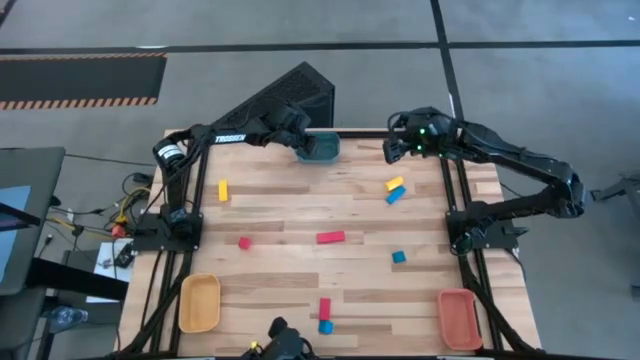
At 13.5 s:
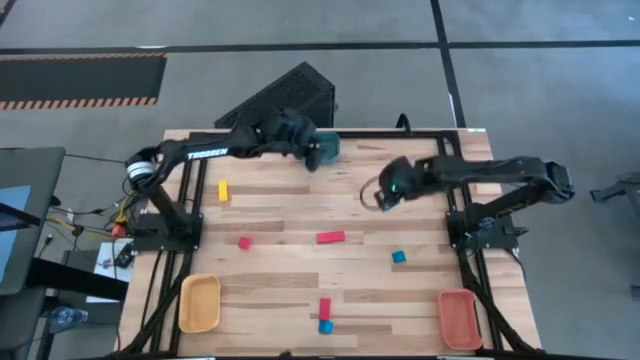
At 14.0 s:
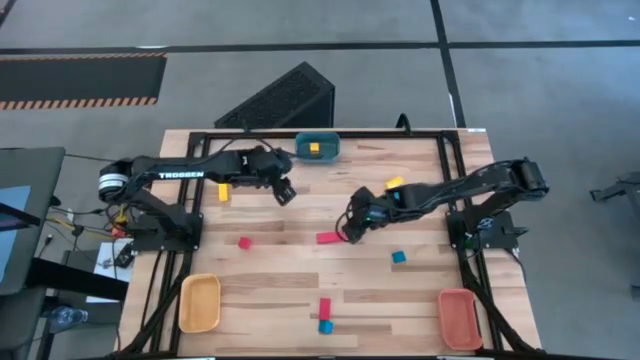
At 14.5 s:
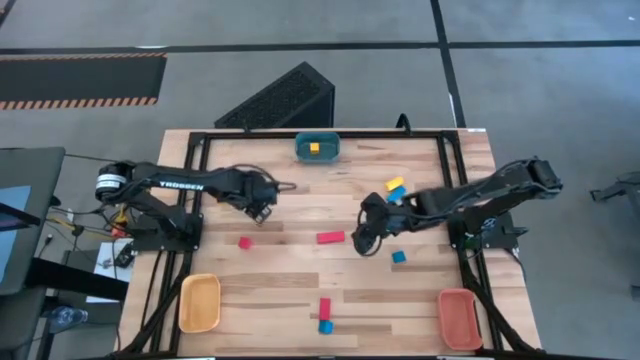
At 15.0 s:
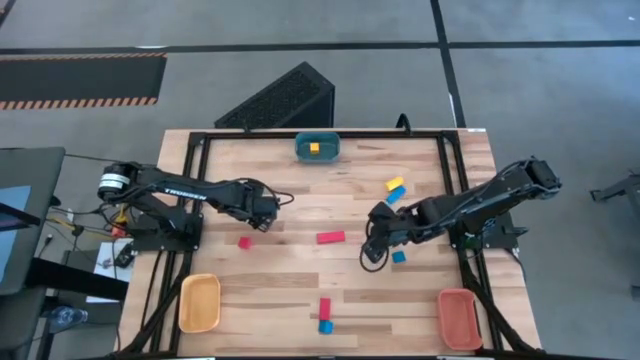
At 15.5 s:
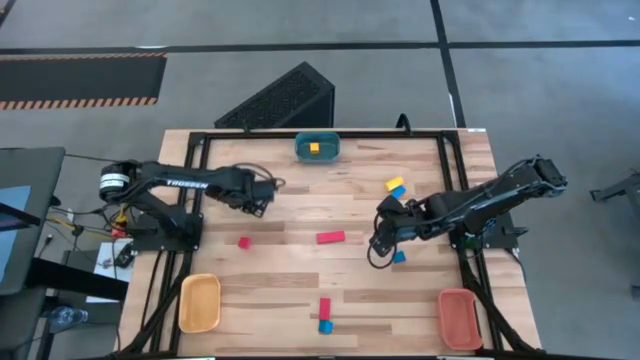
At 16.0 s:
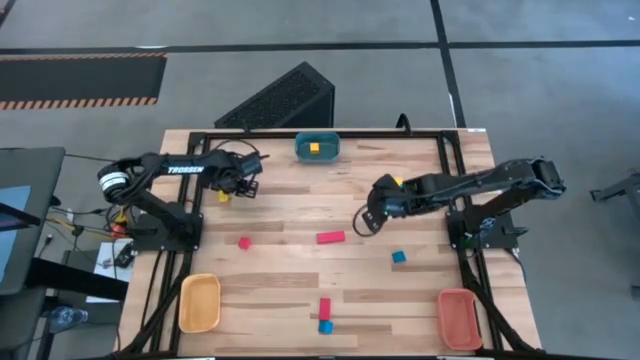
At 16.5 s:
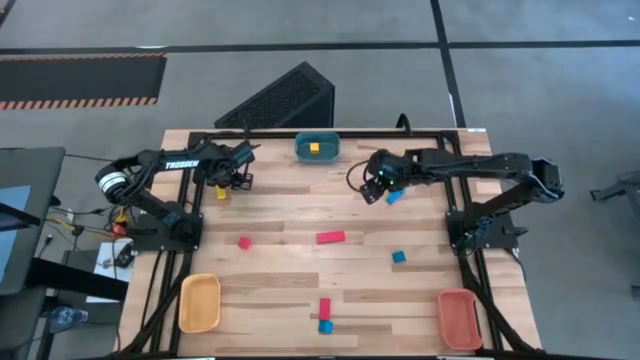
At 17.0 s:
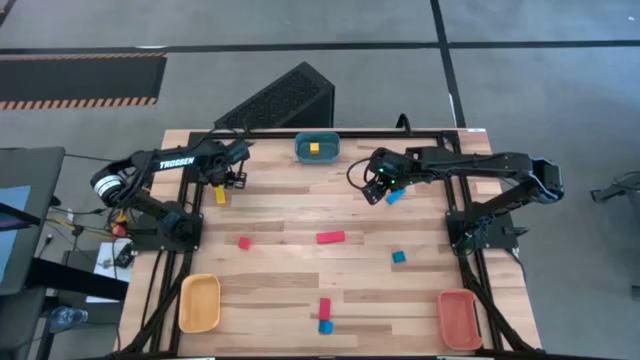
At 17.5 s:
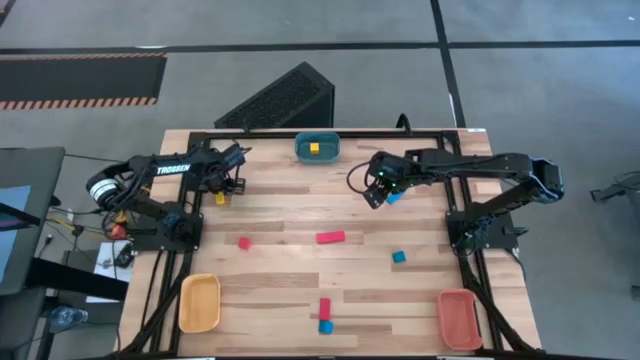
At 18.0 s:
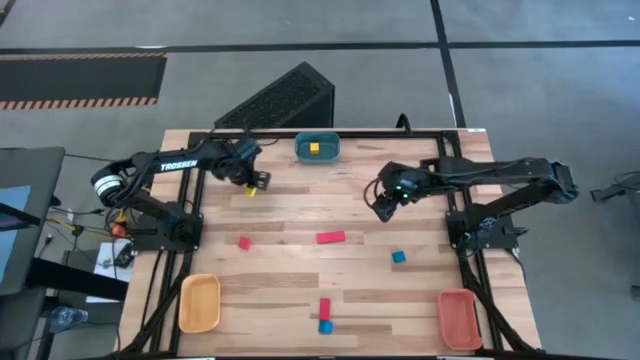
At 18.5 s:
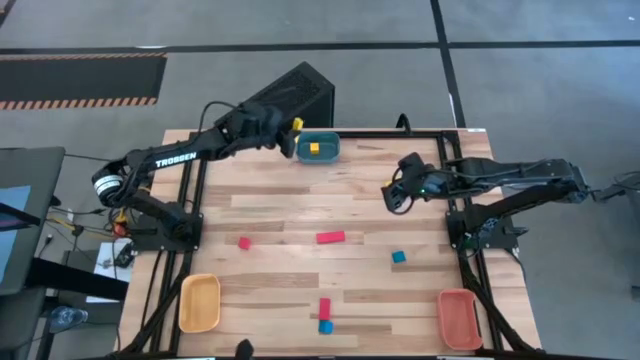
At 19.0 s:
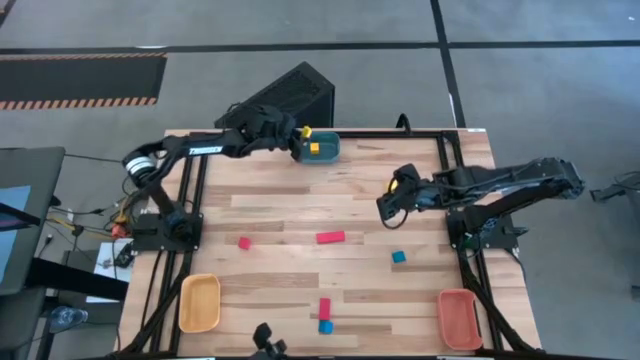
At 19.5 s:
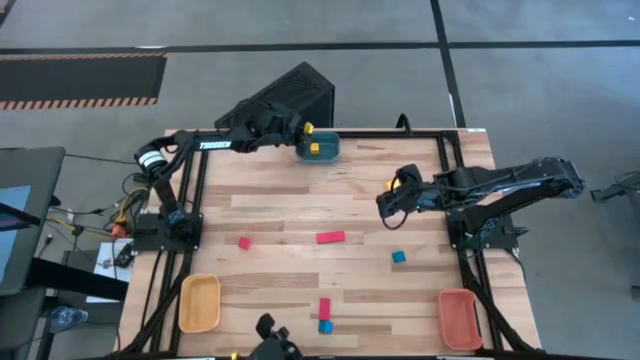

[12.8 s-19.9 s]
Task: Sort & place blocks by color
Put the left yellow block into the blue bin

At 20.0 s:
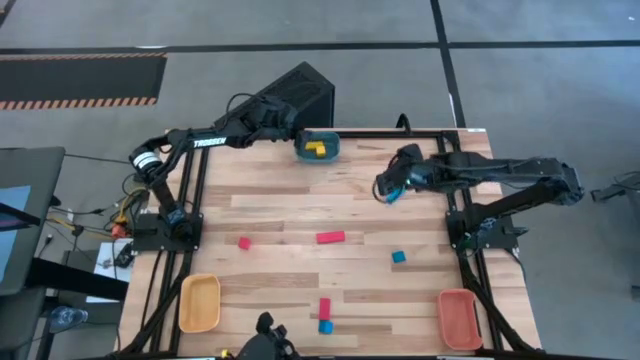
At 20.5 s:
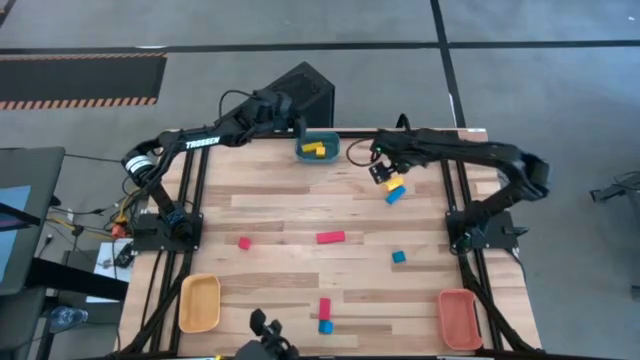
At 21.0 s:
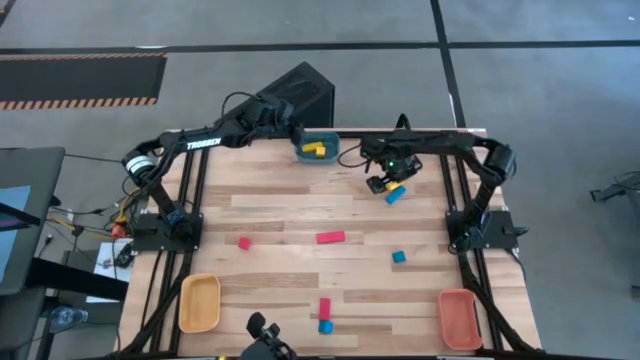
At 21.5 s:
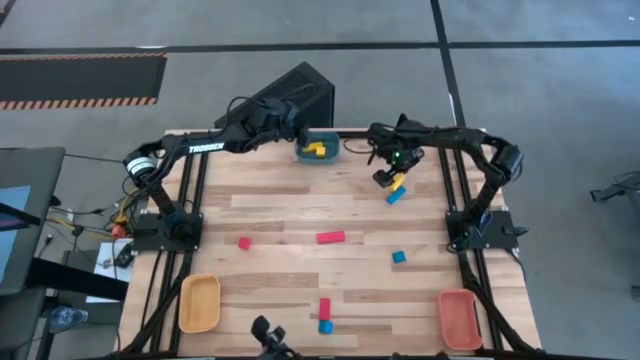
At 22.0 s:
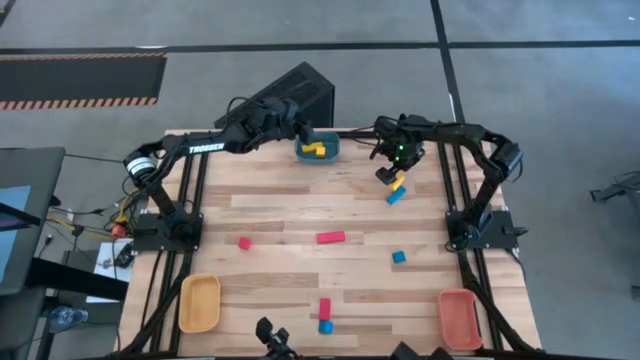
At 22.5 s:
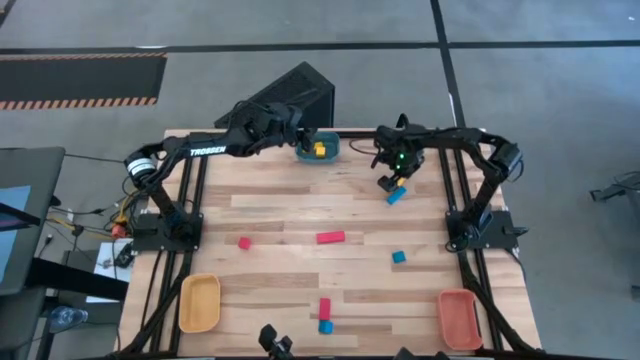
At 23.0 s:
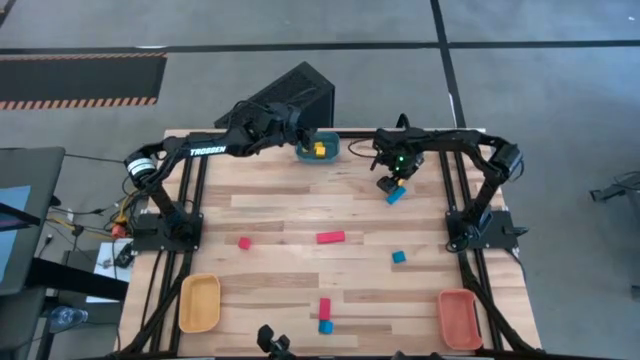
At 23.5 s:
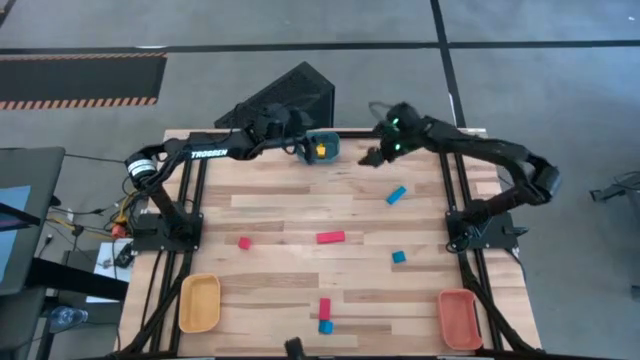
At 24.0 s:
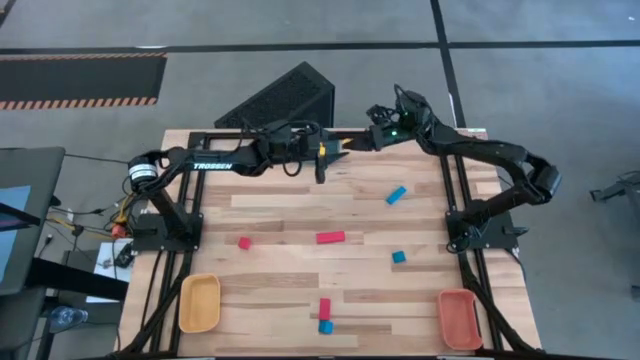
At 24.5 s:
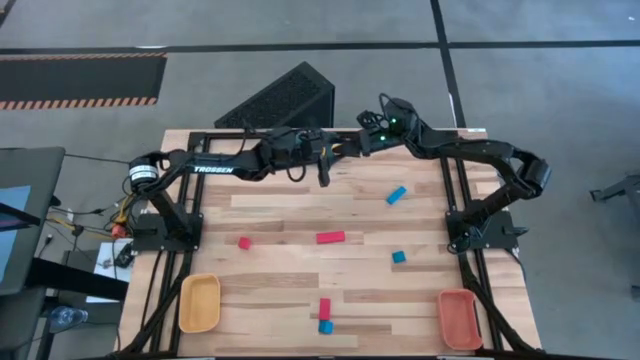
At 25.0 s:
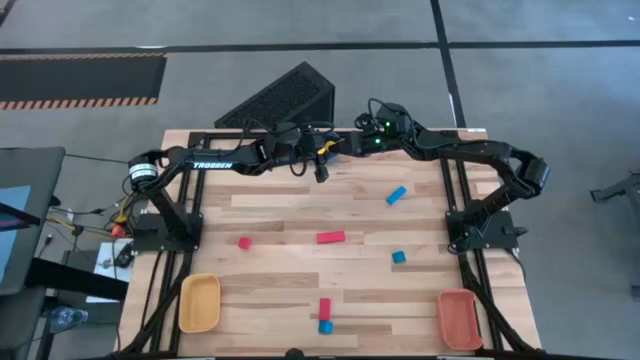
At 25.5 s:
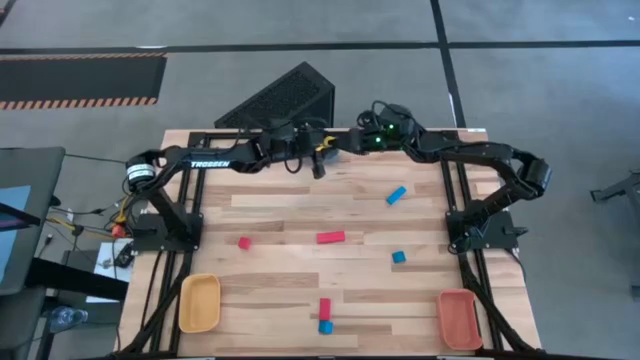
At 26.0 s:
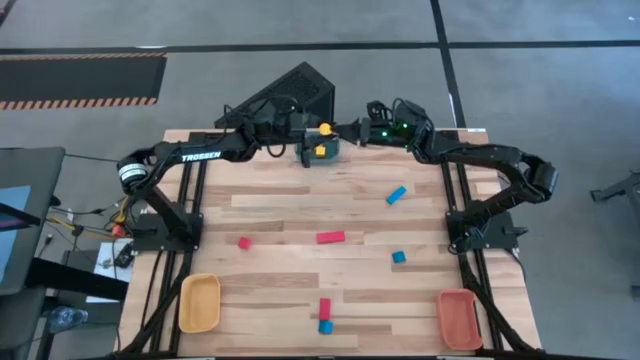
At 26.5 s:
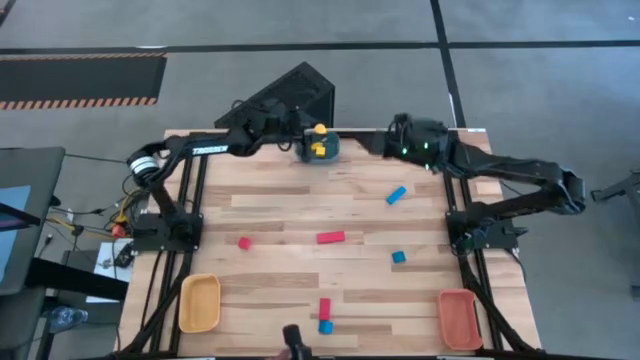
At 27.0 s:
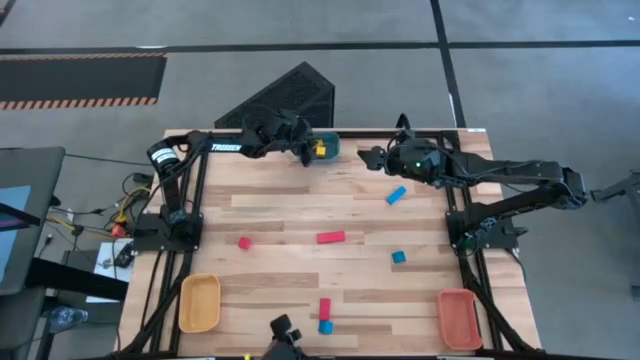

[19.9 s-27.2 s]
Put the yellow block into the blue bin

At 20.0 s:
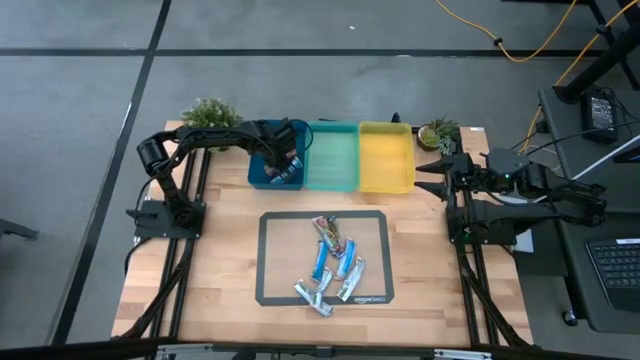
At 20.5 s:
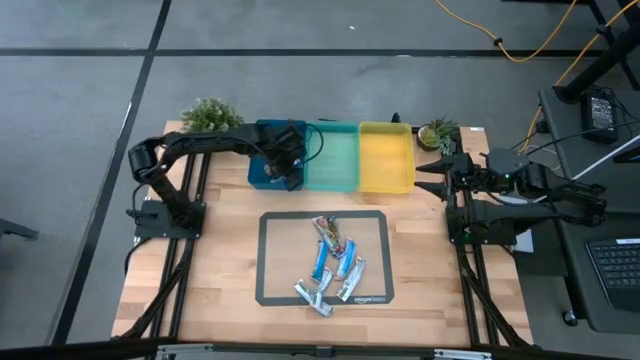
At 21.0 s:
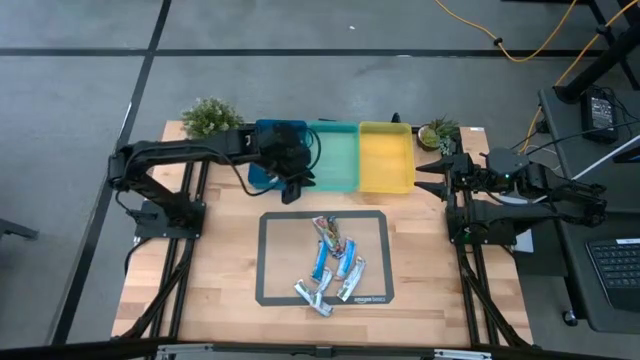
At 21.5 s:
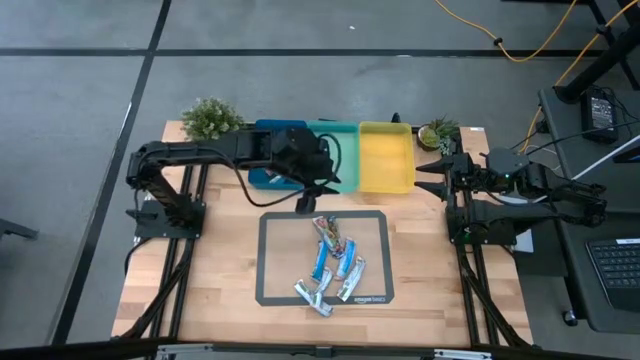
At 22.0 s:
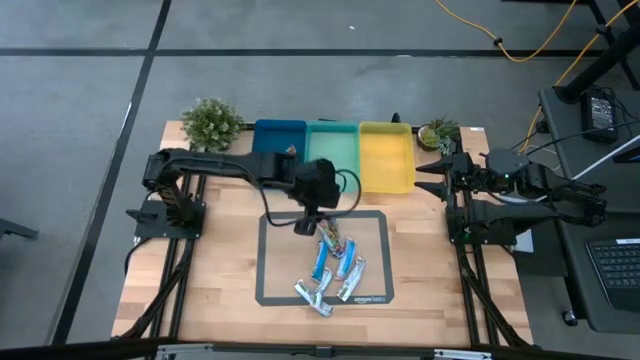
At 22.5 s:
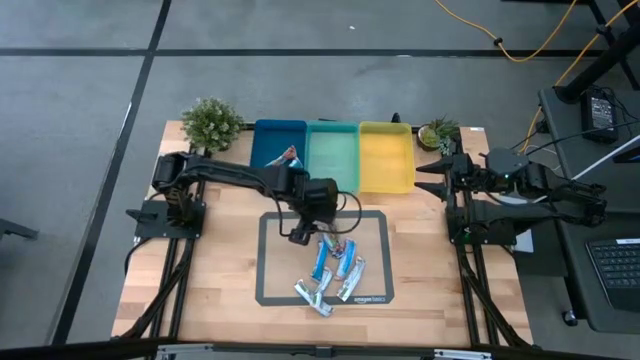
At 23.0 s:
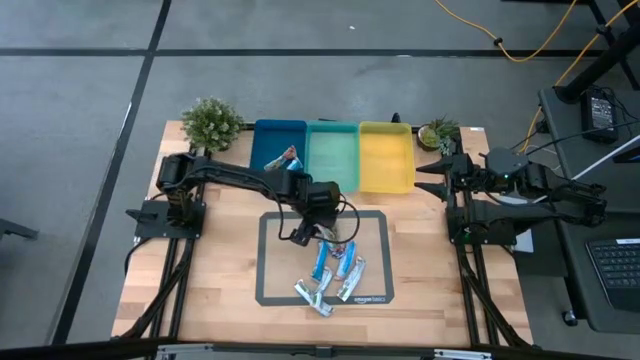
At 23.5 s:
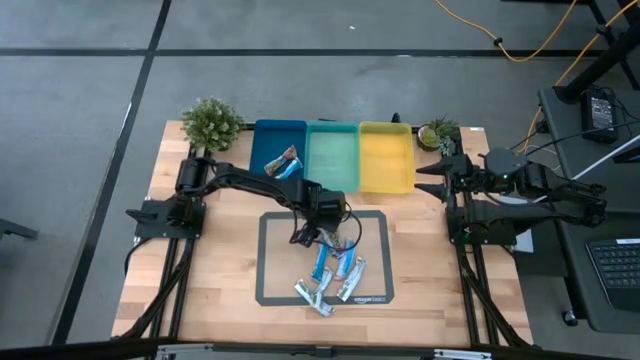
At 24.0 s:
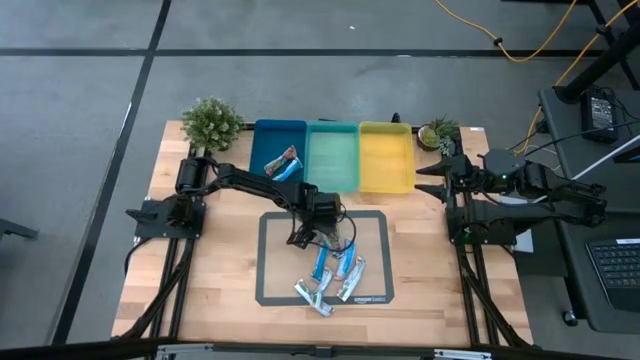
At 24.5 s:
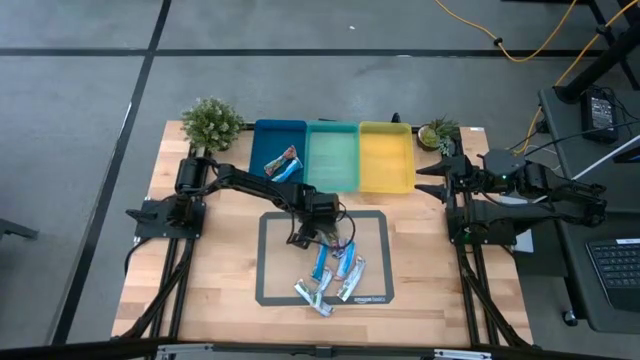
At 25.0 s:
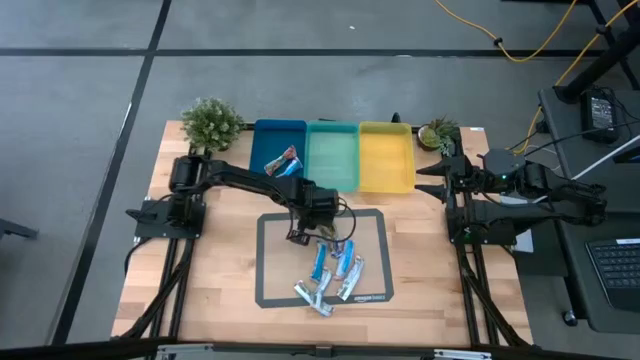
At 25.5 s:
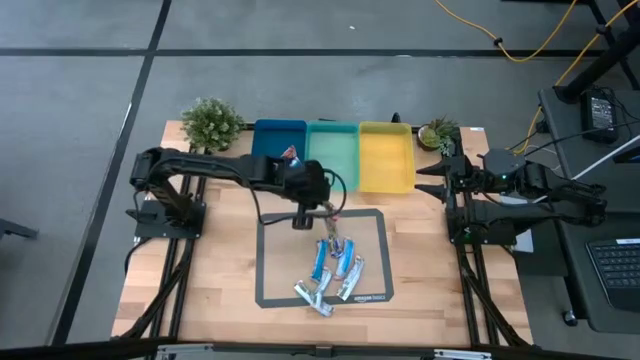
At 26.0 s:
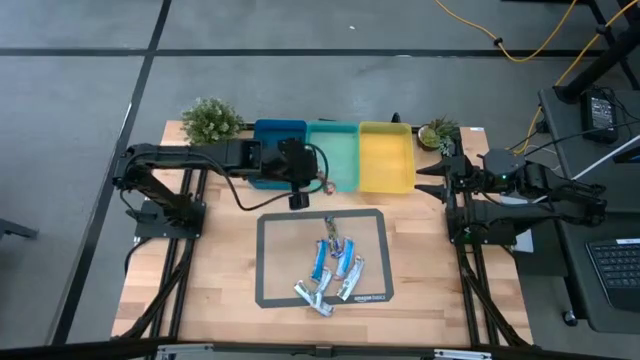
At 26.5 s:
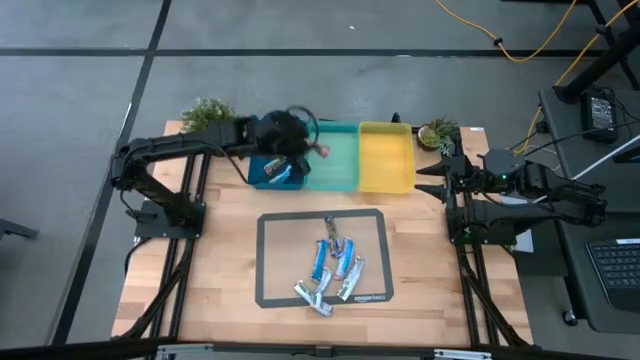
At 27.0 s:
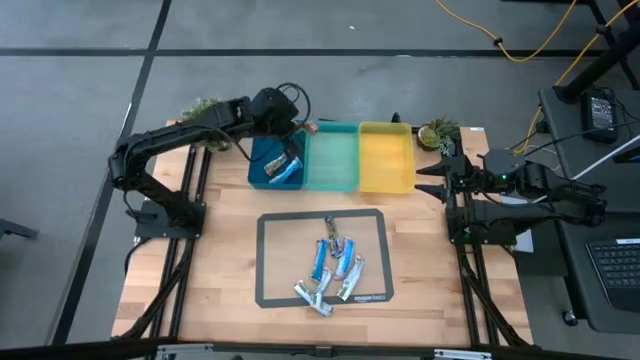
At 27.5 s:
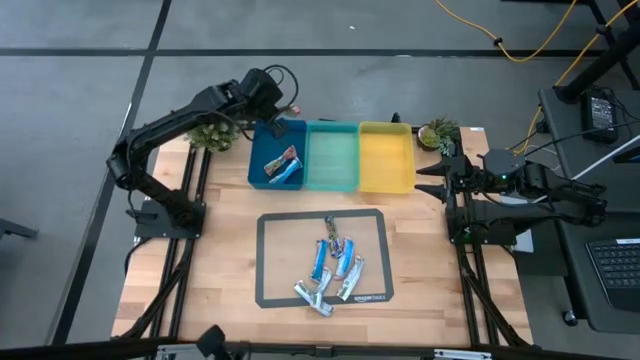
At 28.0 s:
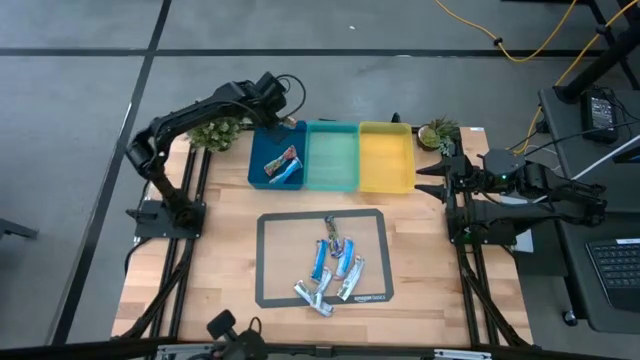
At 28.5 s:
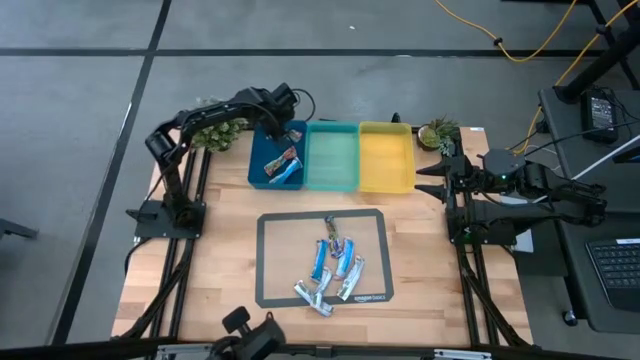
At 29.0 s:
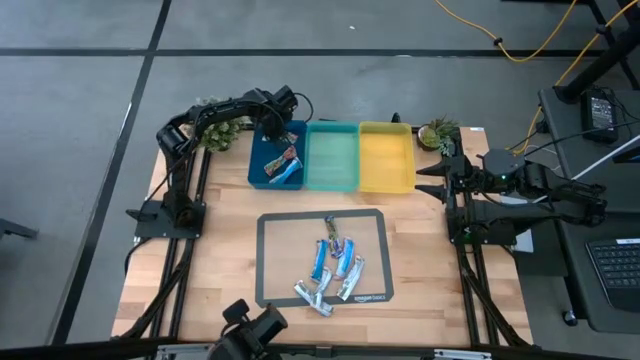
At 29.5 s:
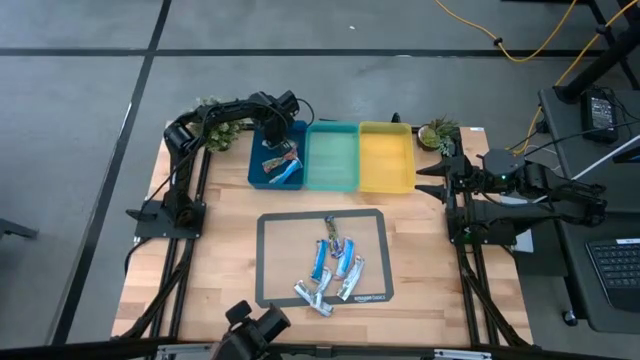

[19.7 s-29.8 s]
Task: Pick and place Granola Bars by type
Put the red granola bar into the blue bin
